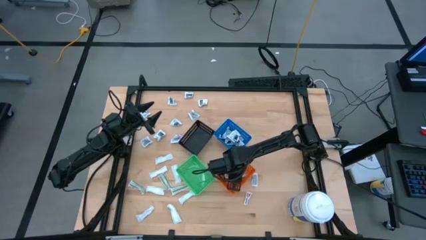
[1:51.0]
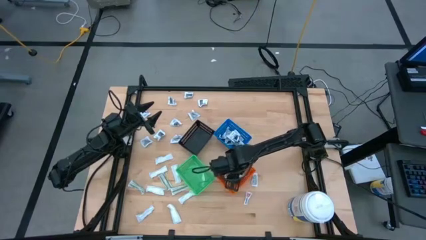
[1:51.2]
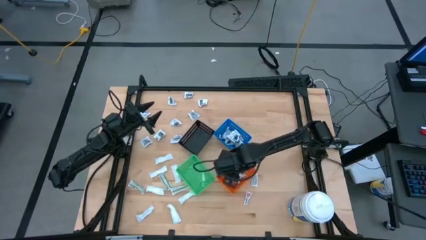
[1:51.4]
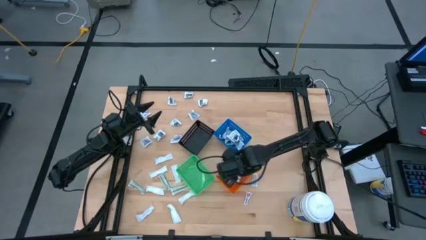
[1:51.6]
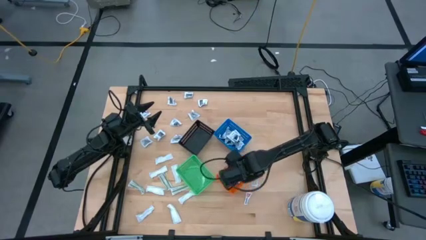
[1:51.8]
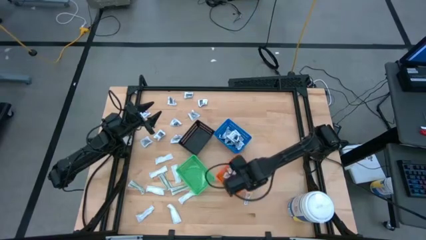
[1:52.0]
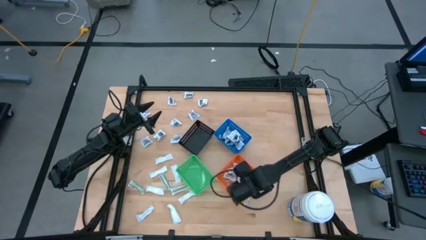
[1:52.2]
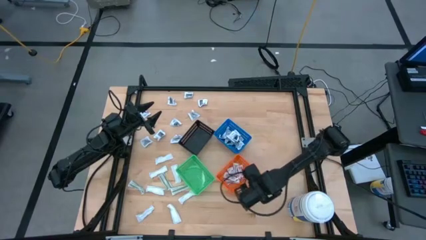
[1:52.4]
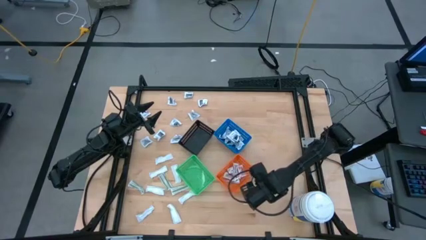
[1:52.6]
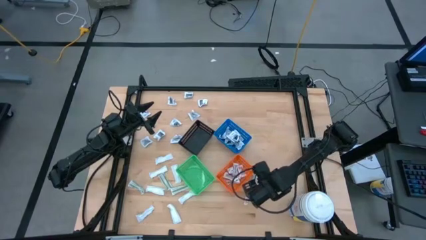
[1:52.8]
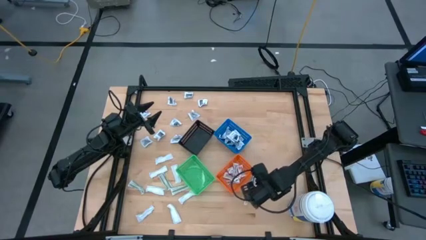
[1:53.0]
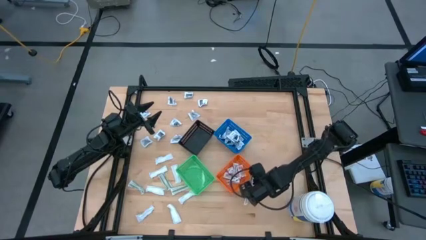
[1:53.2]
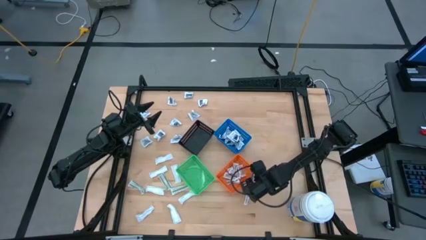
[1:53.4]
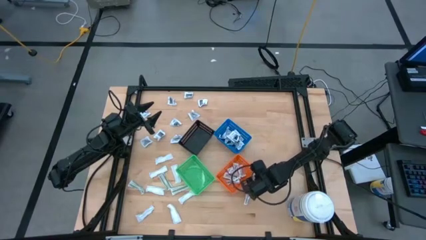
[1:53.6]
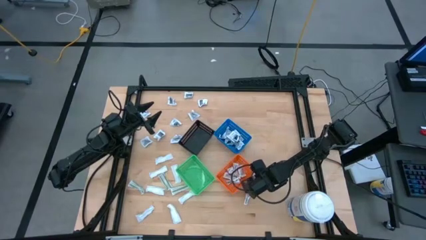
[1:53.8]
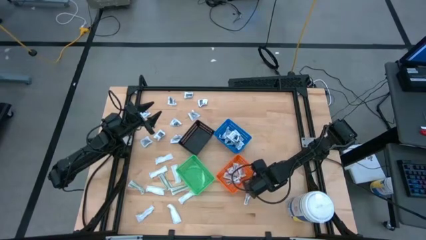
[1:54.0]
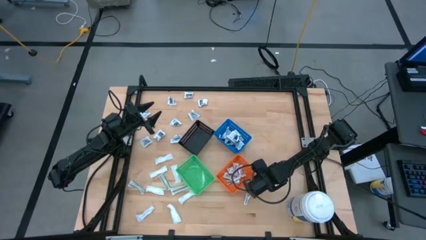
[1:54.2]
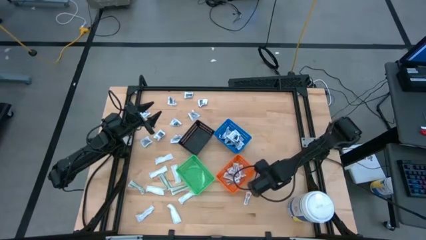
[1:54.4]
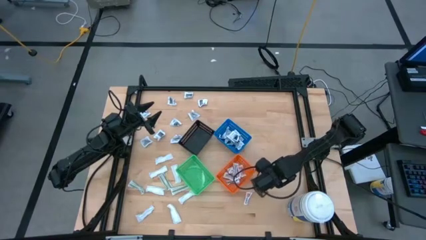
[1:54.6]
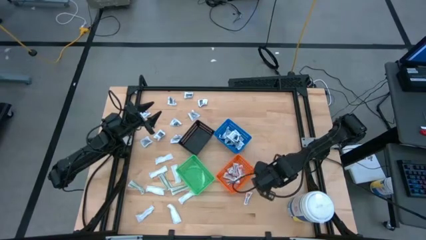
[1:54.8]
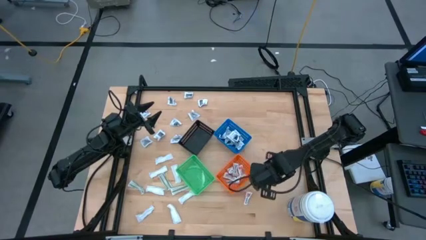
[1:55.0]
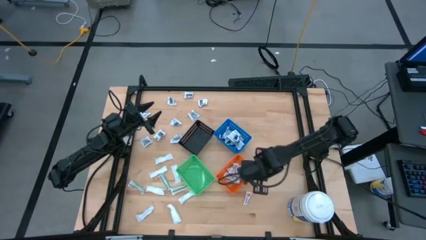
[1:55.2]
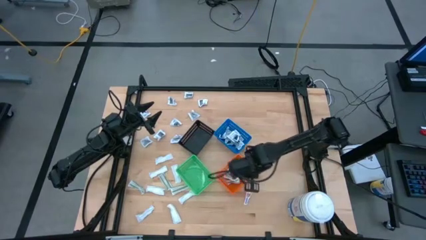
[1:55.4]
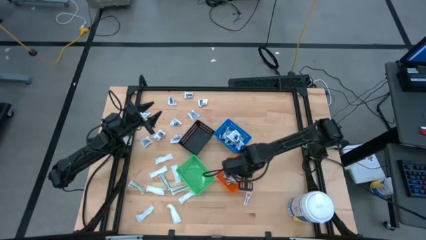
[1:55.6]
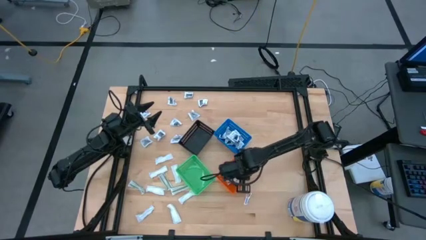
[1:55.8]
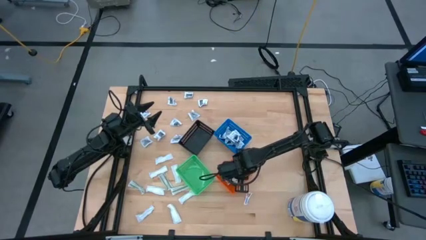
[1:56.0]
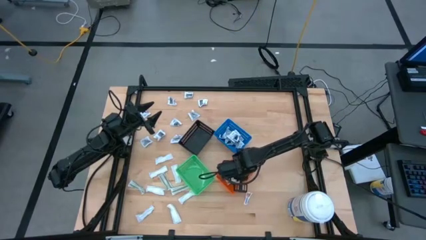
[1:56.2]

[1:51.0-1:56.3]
Task: Pick & Place First Aid Supplies
Put the orange ointment pack into the orange bin

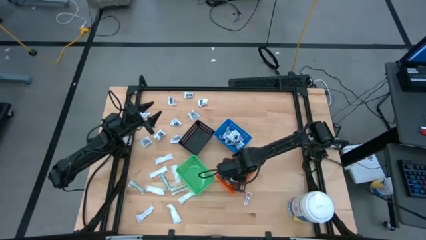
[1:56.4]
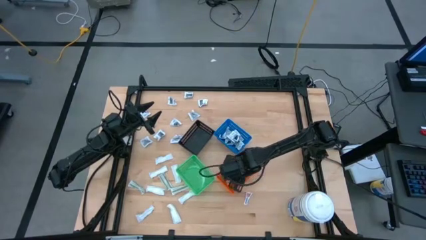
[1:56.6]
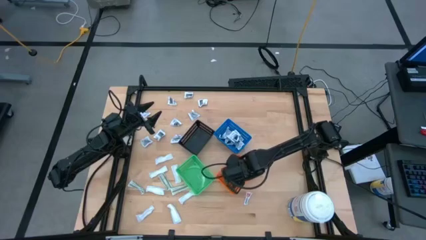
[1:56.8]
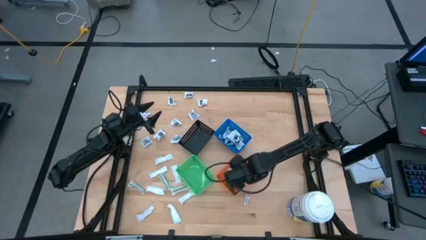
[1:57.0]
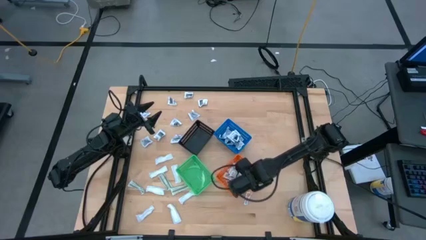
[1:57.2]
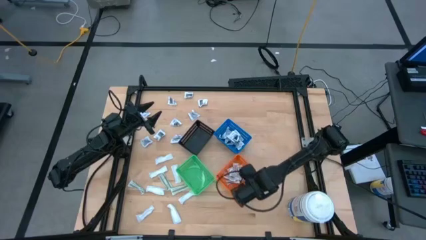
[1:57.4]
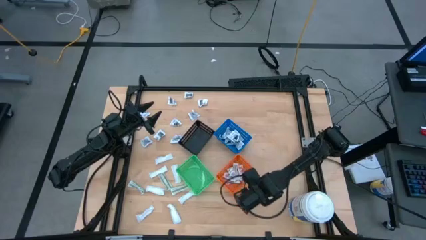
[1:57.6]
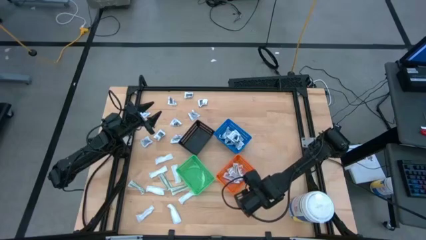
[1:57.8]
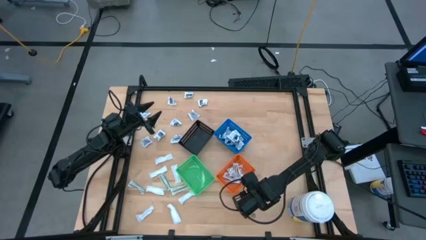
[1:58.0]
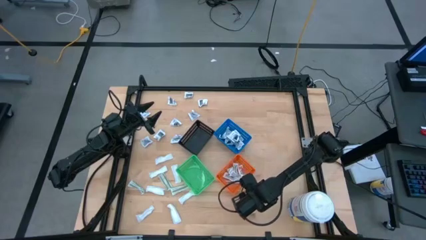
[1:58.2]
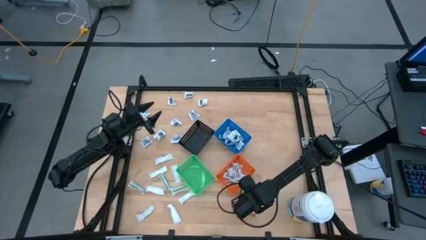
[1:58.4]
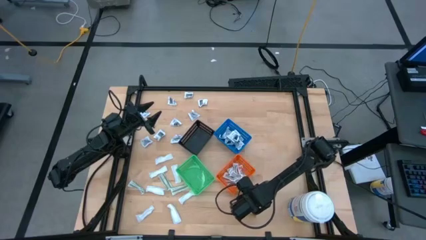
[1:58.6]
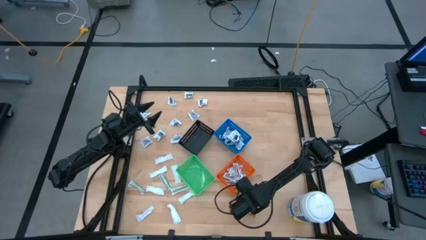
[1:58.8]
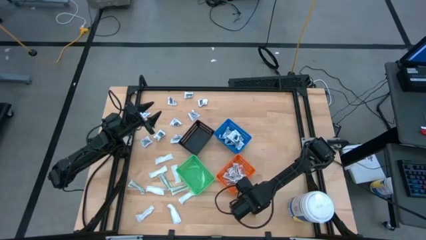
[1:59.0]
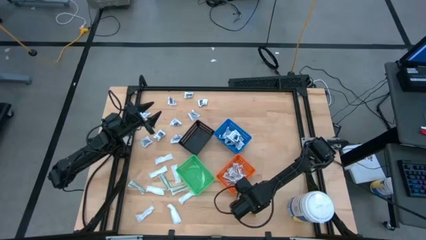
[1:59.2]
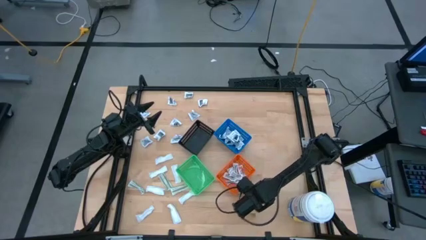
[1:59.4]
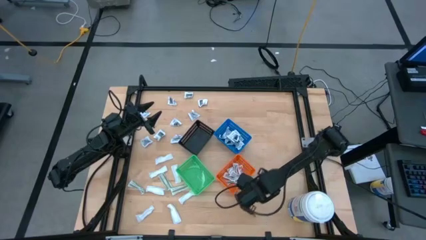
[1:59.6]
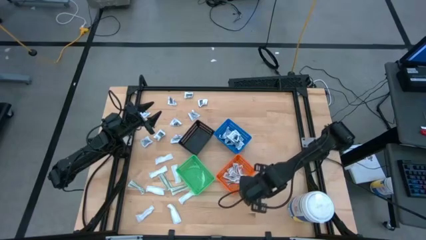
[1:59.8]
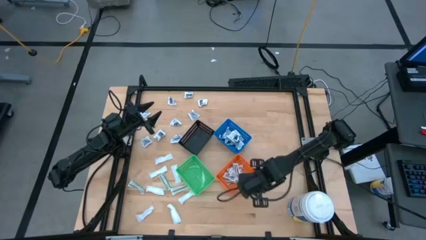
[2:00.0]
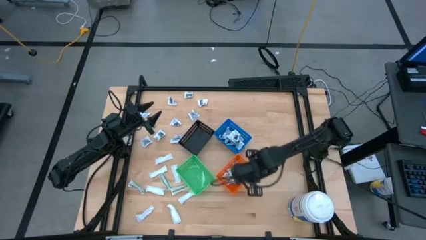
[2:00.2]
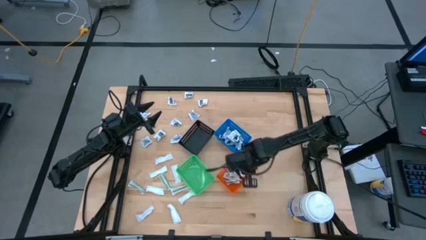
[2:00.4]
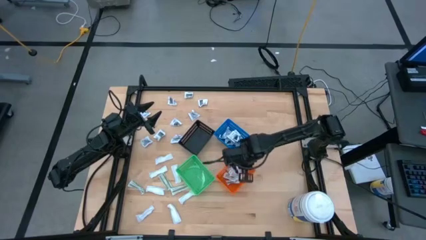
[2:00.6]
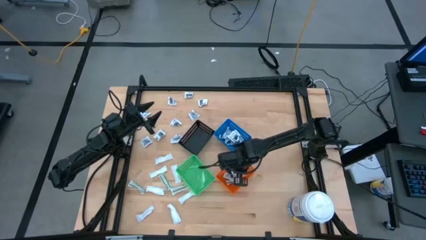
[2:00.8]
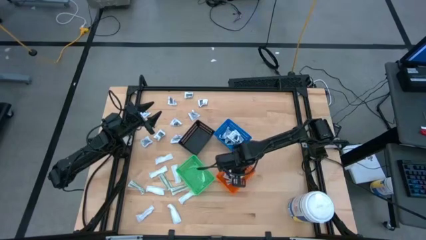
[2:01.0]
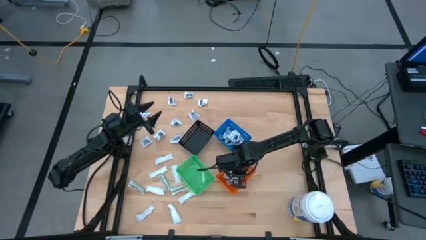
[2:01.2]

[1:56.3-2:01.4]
Put the orange ointment pack into the orange bin

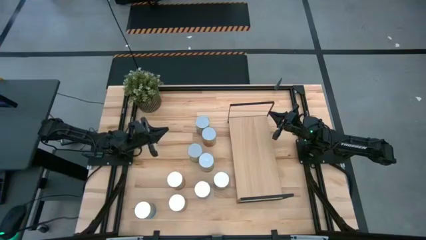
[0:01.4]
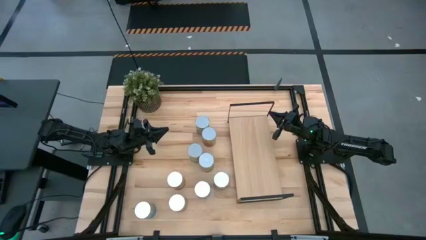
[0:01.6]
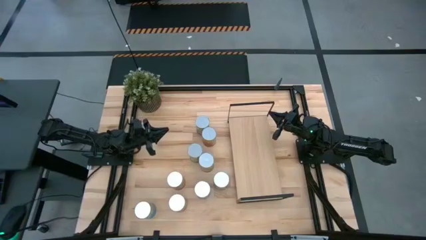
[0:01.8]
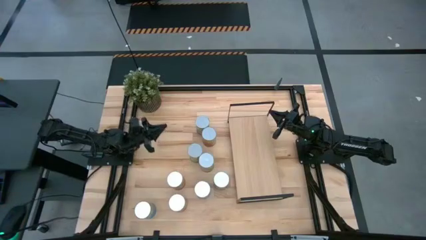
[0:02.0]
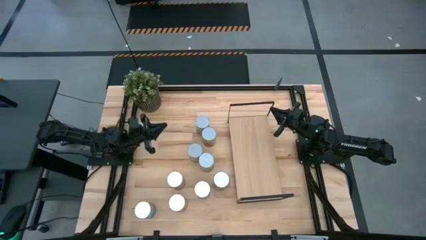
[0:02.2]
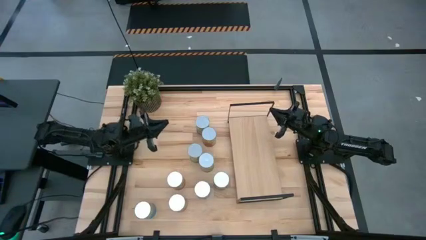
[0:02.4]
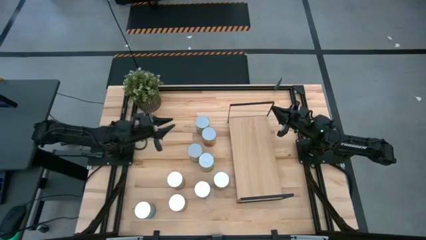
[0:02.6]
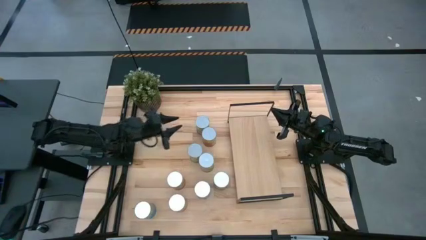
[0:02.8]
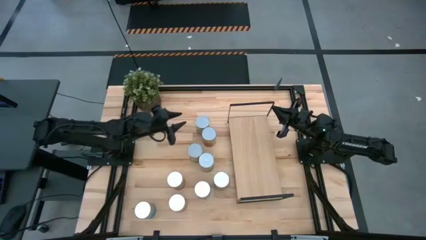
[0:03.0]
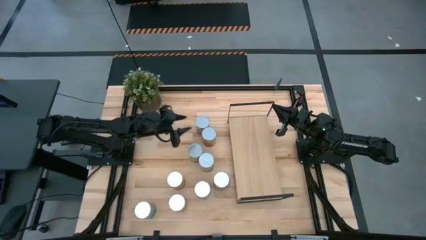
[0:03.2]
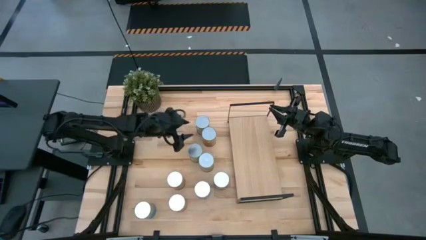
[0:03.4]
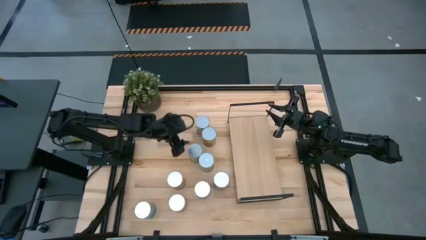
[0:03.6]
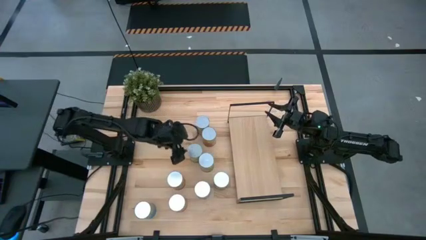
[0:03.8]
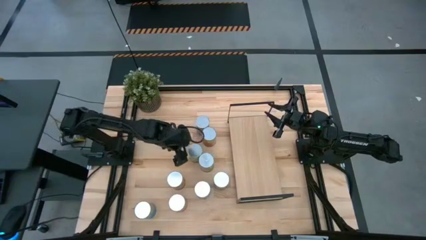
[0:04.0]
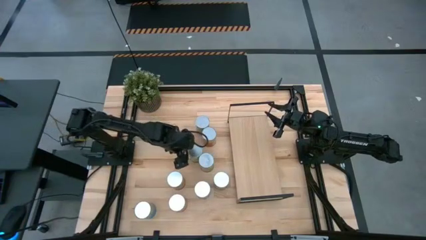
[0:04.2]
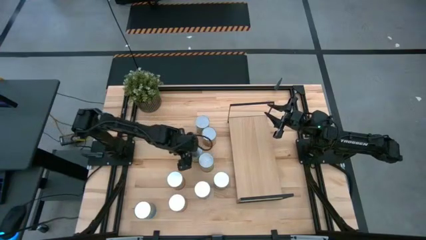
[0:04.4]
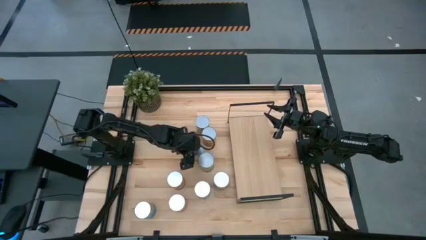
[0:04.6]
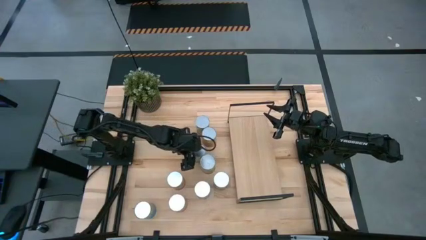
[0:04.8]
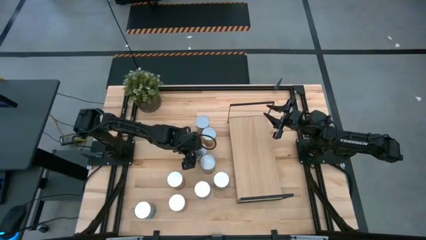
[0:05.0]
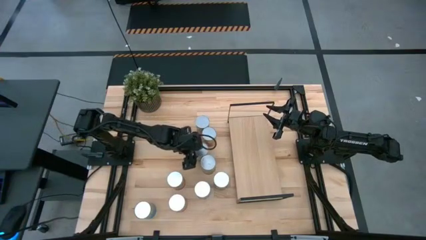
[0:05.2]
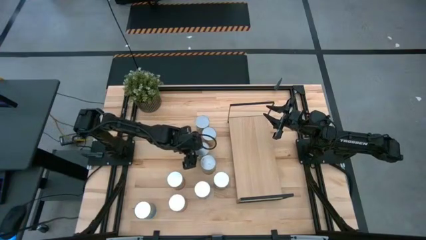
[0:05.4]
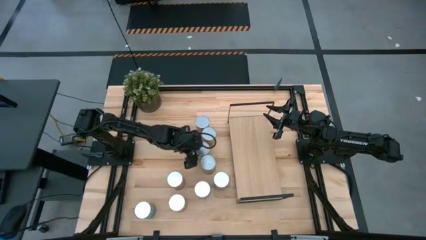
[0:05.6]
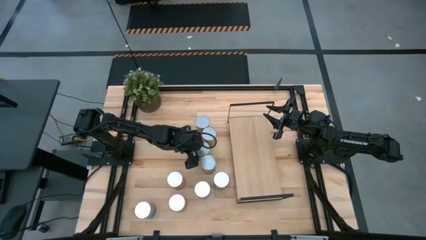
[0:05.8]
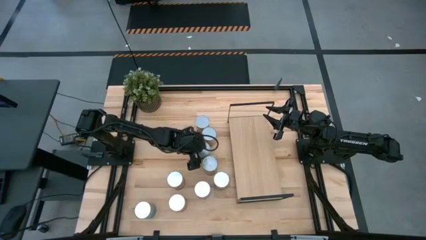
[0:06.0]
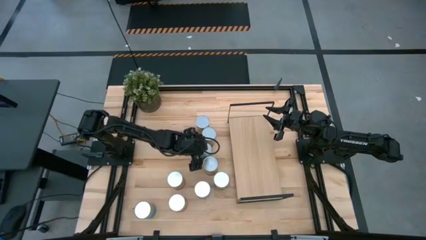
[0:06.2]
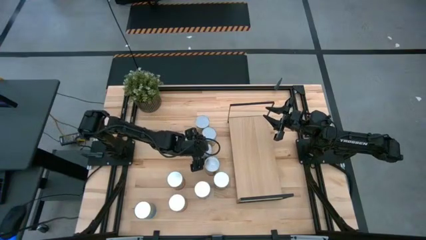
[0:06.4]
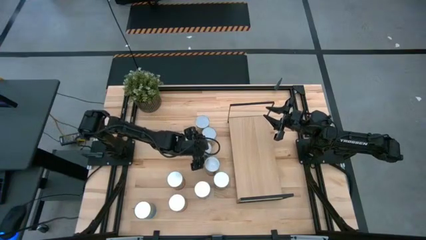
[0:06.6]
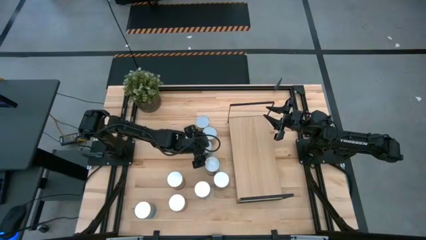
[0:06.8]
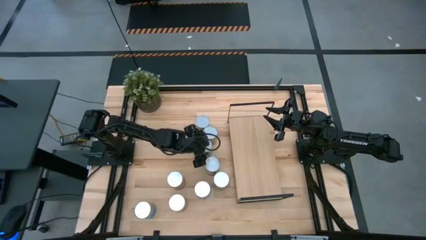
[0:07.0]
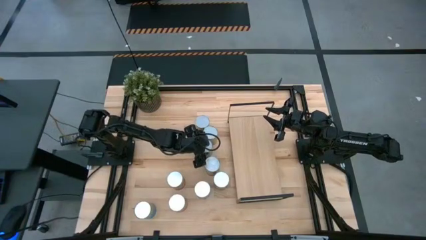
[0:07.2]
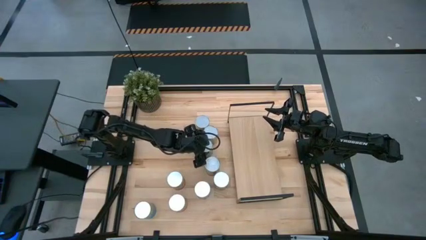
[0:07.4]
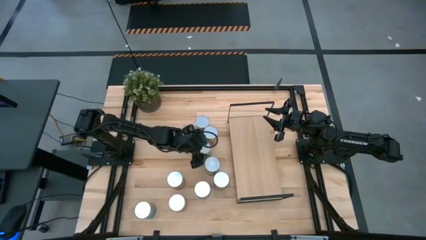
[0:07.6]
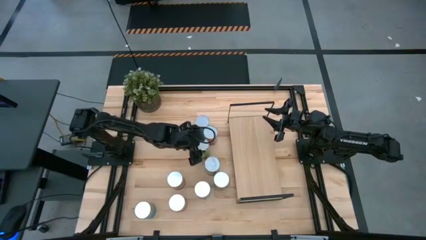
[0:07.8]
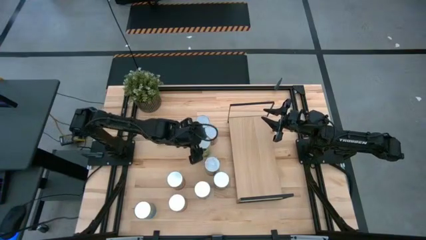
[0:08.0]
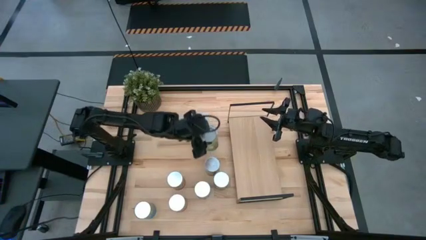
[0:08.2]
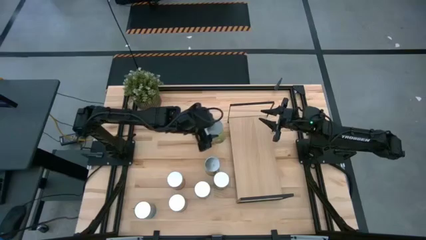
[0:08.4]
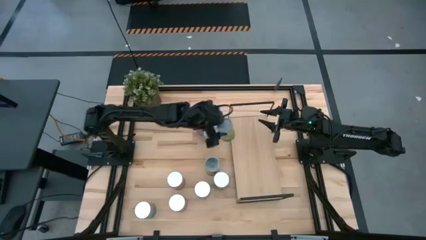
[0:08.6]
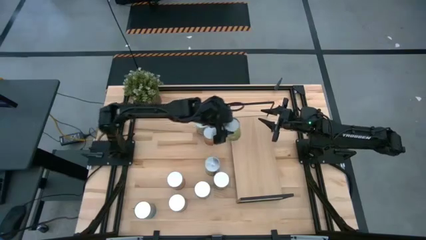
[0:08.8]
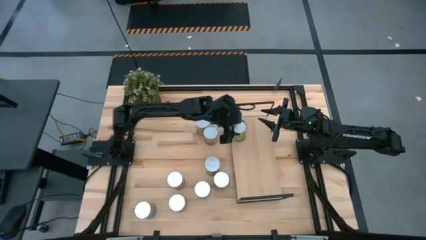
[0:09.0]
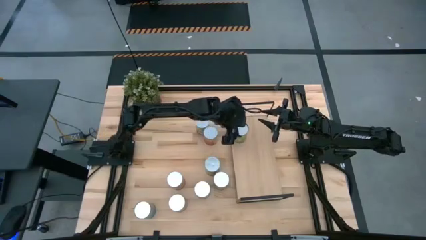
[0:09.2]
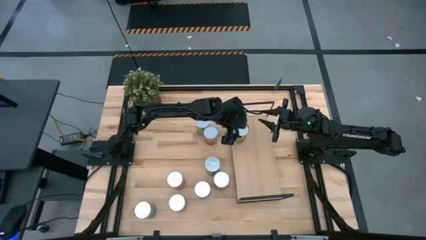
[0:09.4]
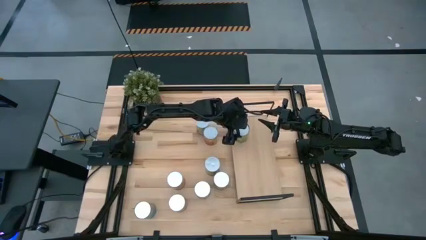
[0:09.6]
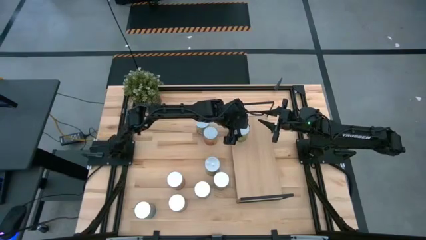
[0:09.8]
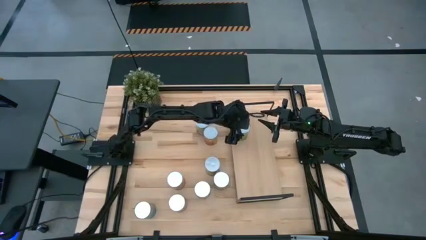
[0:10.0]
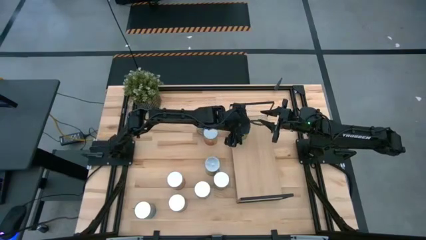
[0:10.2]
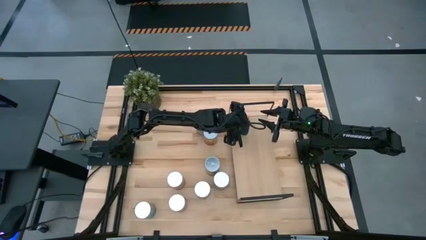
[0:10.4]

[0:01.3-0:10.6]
Task: Pick and place cans onto a shelf
Put the canned pears on the shelf
